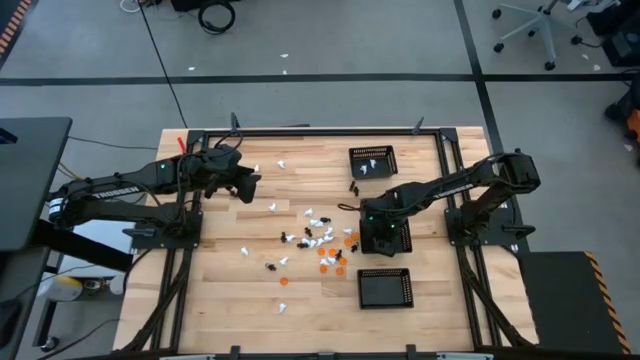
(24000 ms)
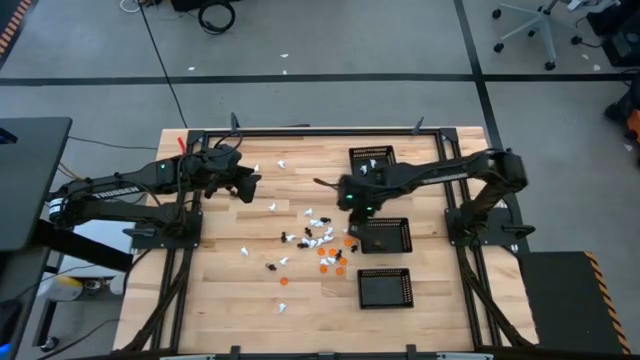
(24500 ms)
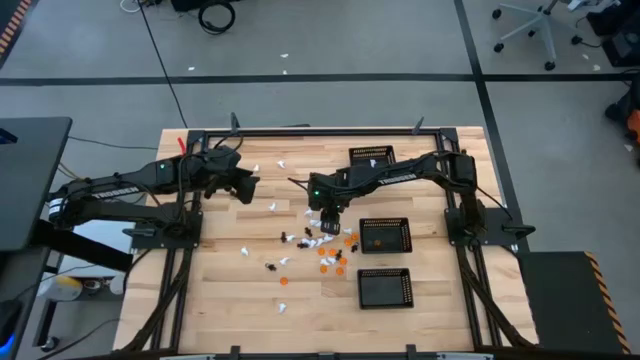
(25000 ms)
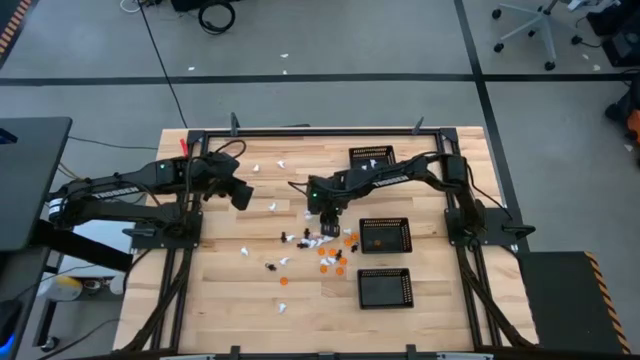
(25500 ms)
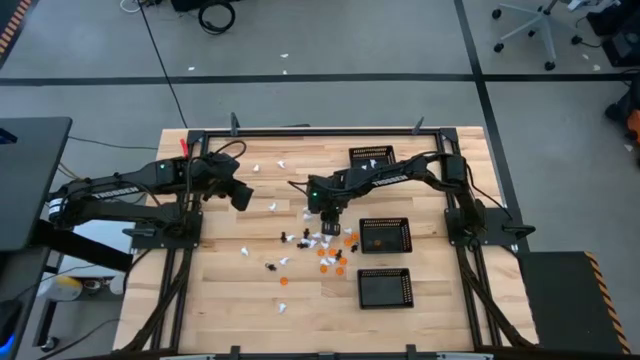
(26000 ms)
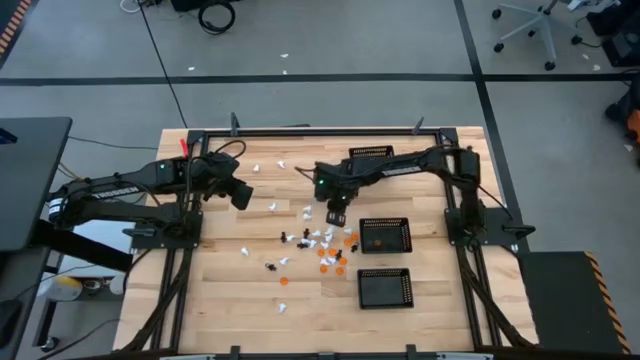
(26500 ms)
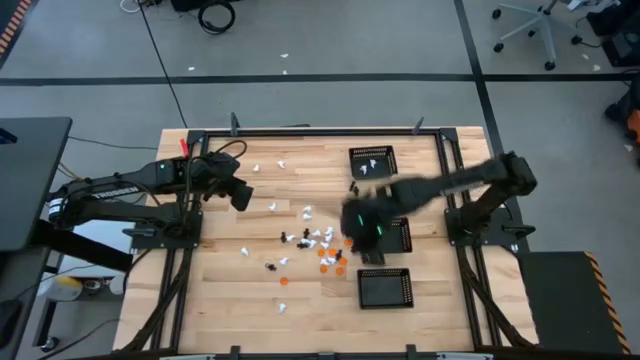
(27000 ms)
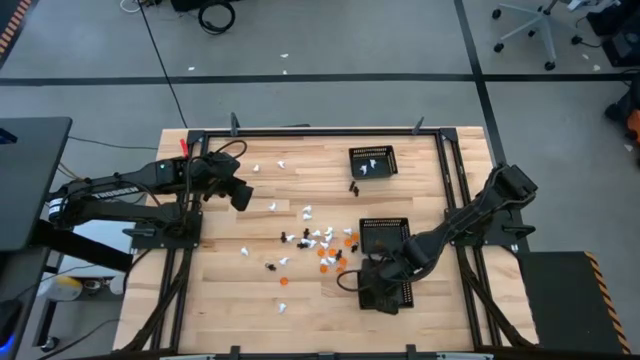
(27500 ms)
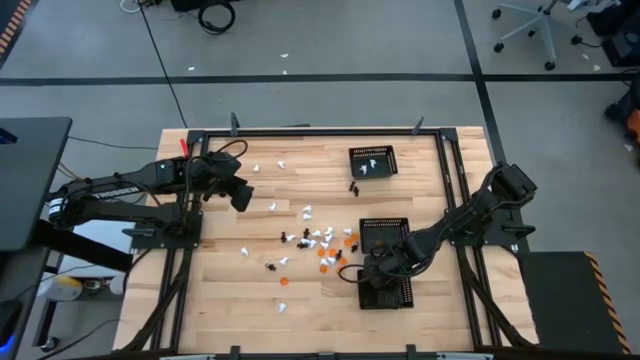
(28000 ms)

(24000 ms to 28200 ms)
Task: Sort Halloween decoration
Put the black skeleton toy into the bottom black bin

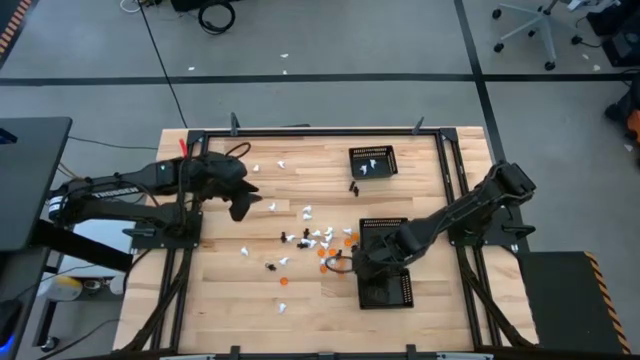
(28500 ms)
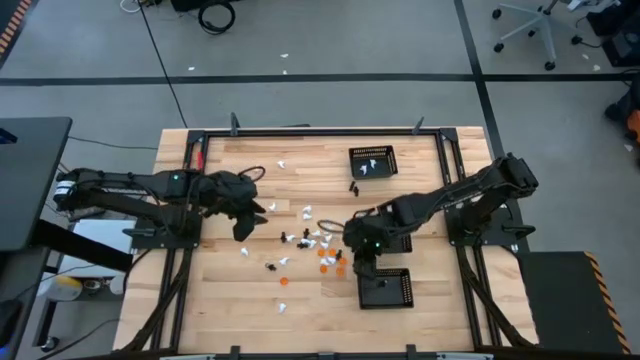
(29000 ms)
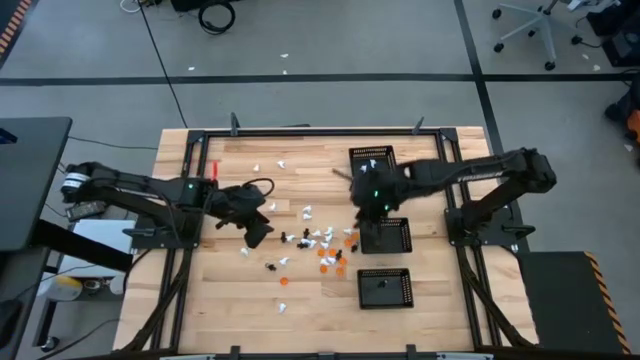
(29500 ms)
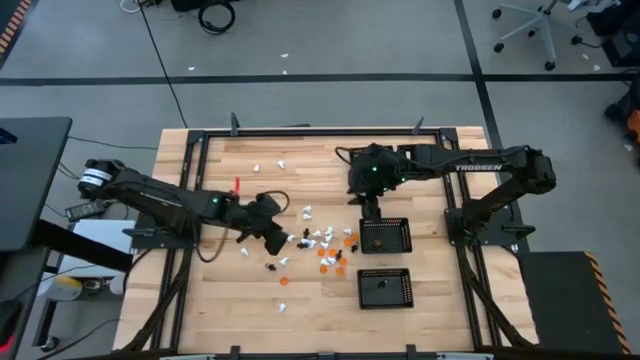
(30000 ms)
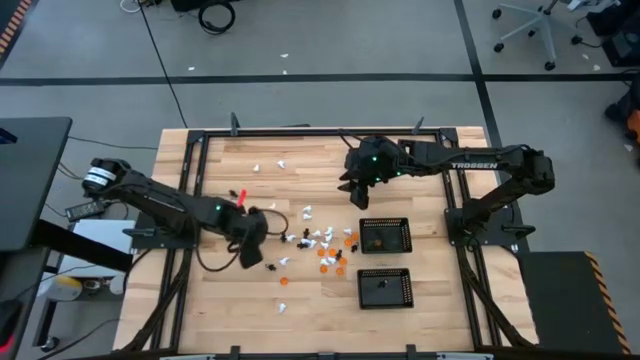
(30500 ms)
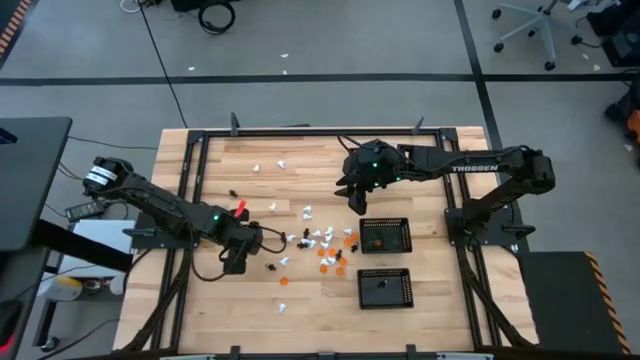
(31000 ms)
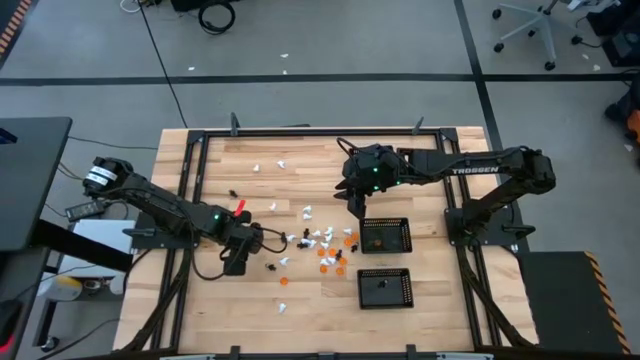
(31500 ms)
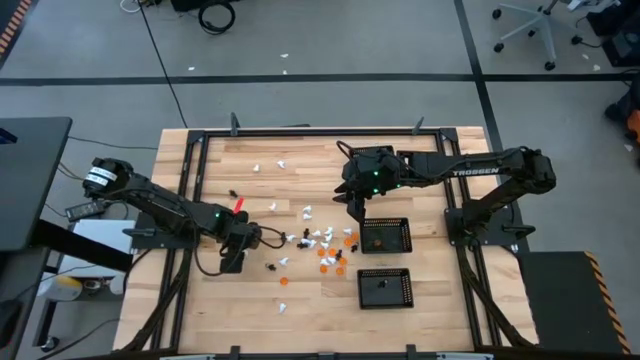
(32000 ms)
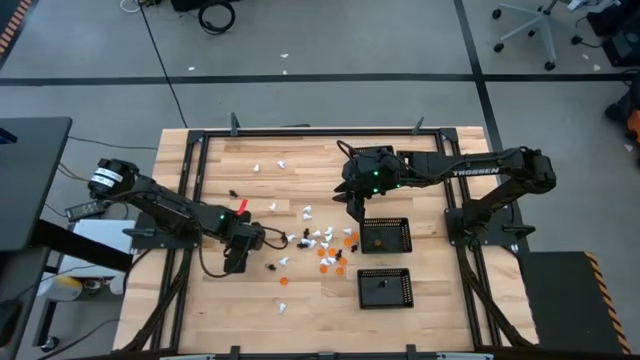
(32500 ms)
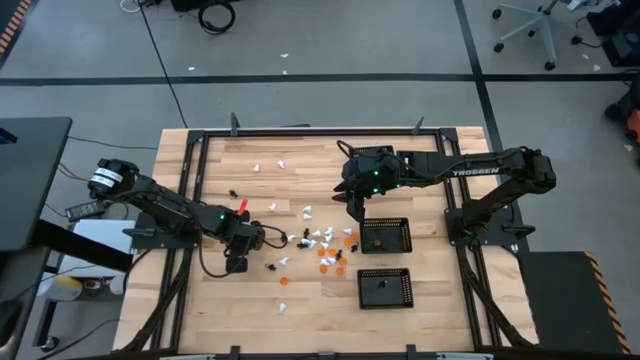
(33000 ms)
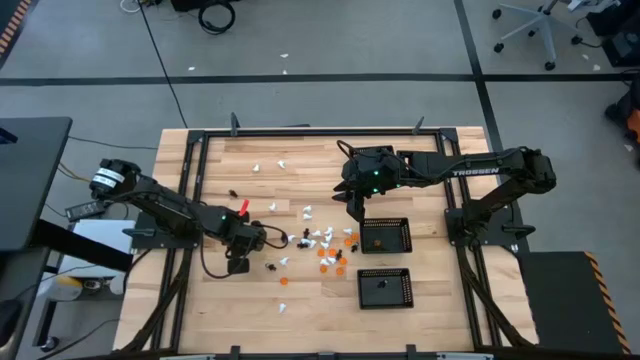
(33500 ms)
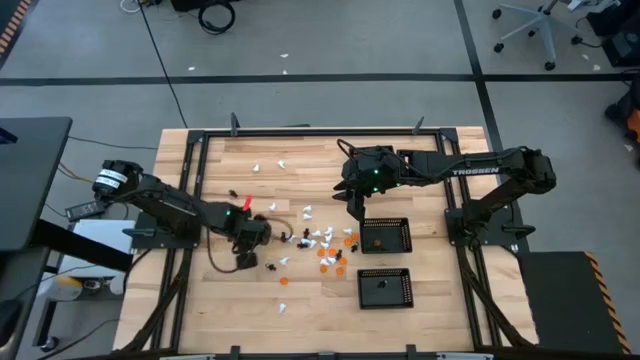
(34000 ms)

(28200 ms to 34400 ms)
Put the white ghost toy into the top black bin

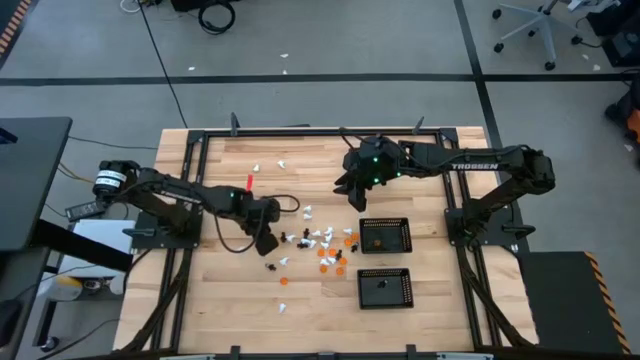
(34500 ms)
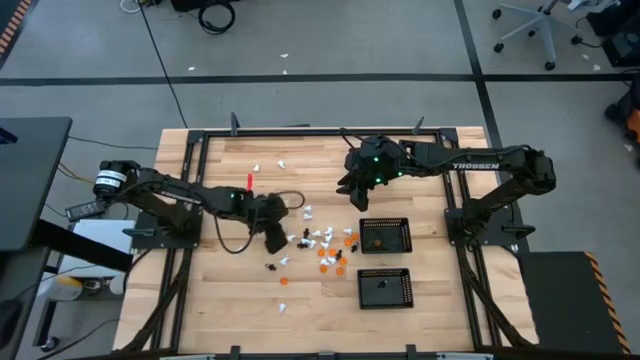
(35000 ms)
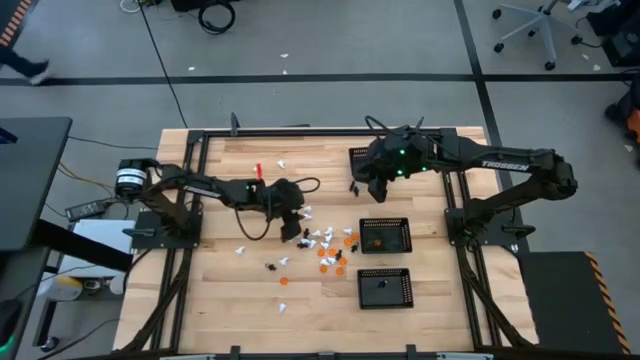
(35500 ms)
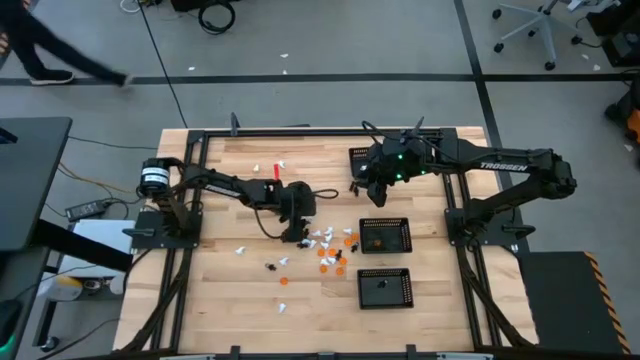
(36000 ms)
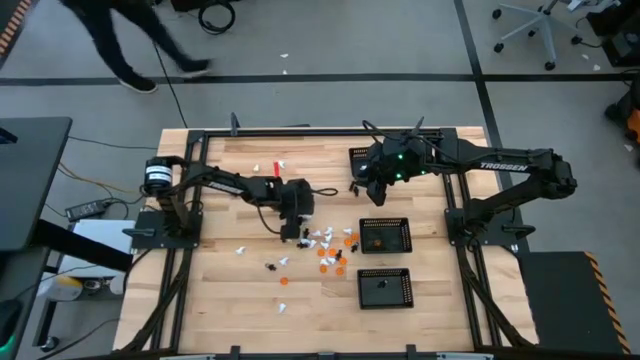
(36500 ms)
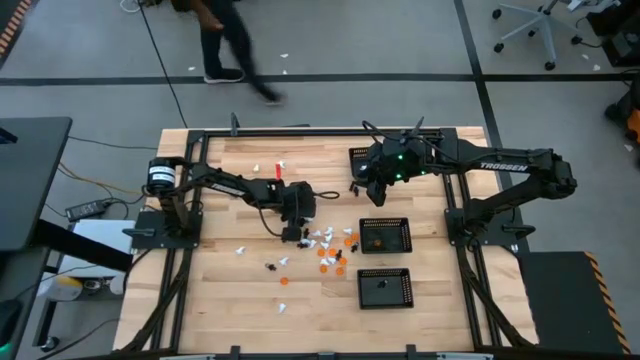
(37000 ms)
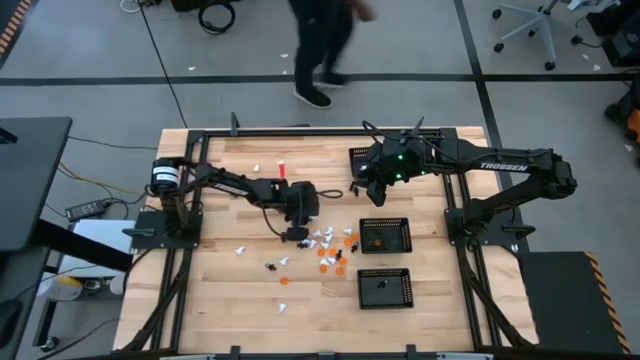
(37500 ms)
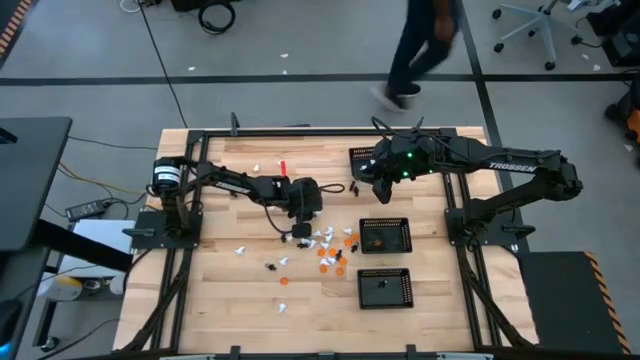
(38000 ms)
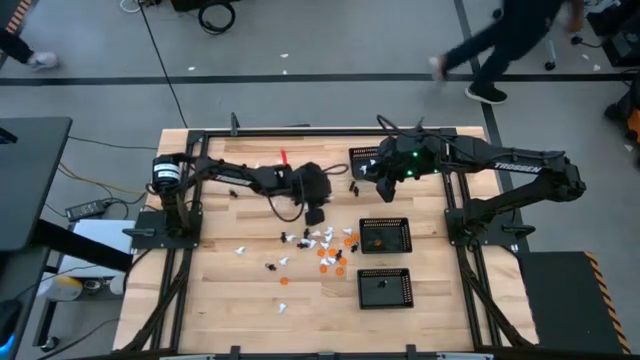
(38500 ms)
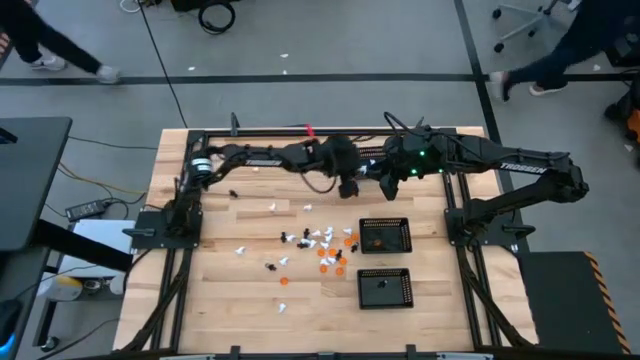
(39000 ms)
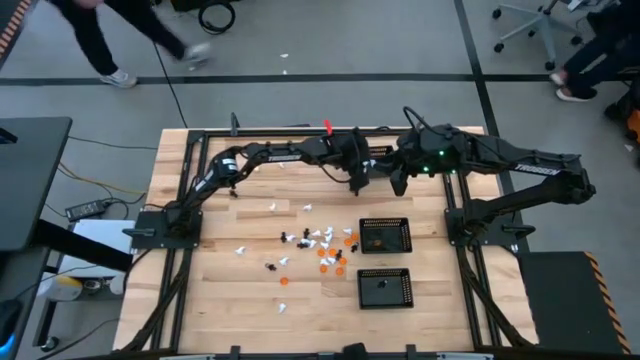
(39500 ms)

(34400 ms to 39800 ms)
Put the white ghost toy into the top black bin

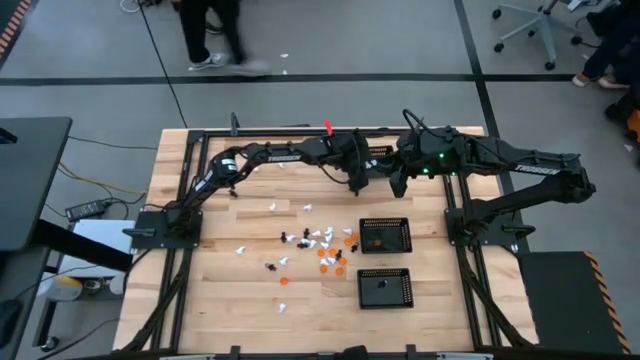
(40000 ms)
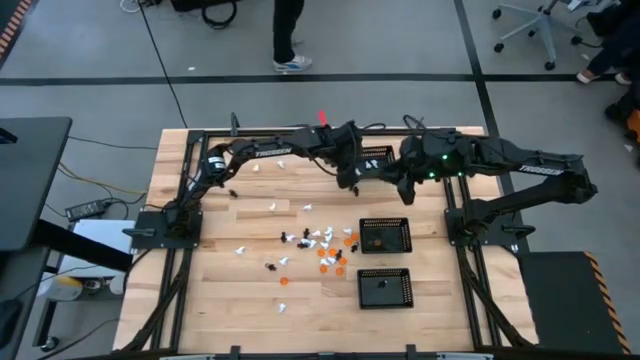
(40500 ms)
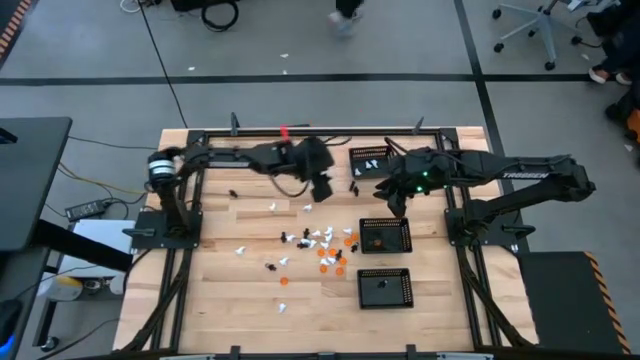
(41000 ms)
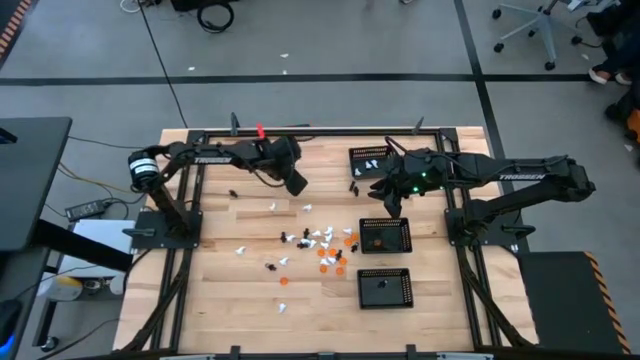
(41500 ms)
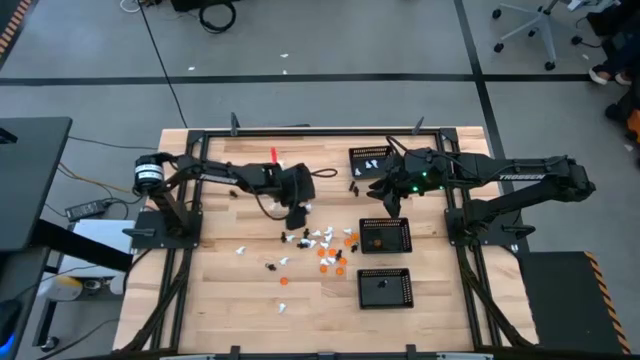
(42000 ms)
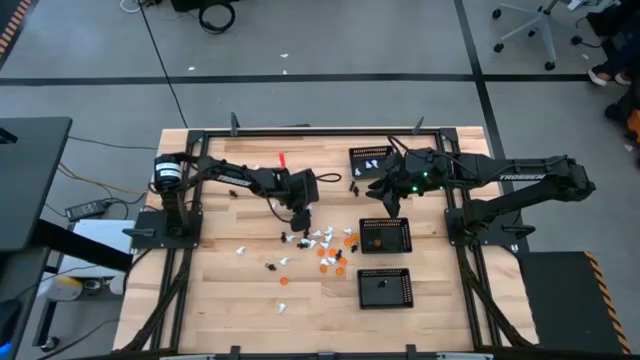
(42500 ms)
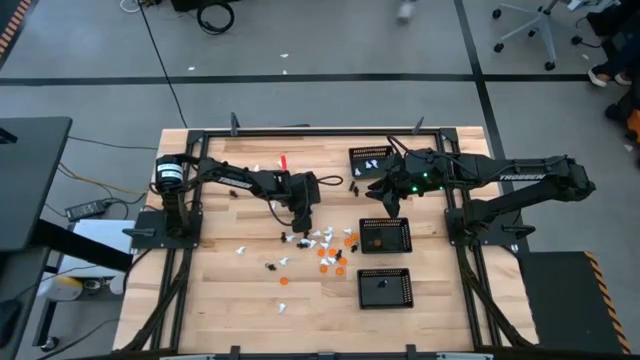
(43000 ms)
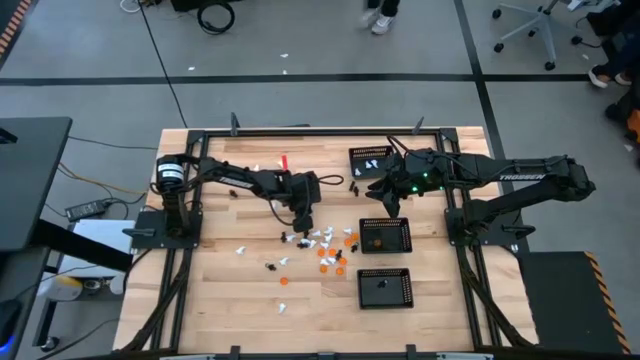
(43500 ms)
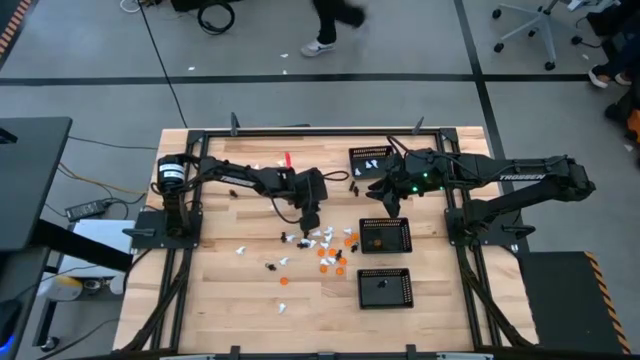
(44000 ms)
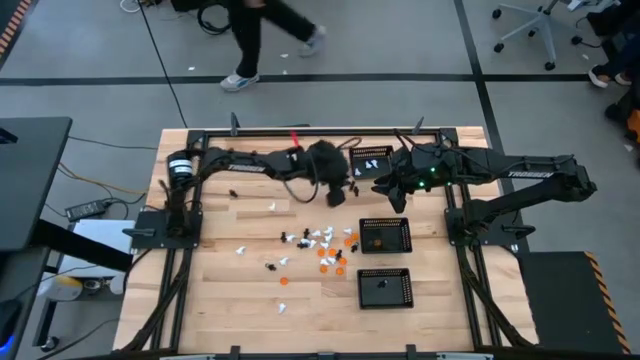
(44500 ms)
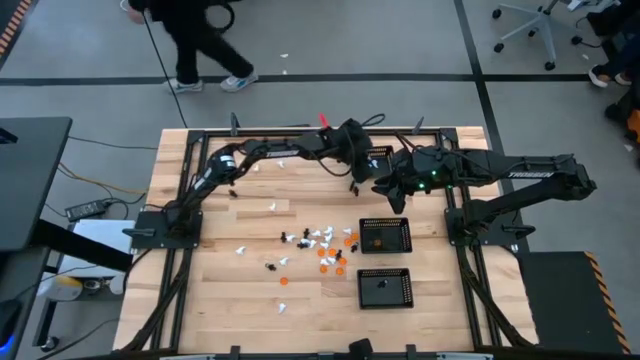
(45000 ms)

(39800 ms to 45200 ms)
Put the white ghost toy into the top black bin
